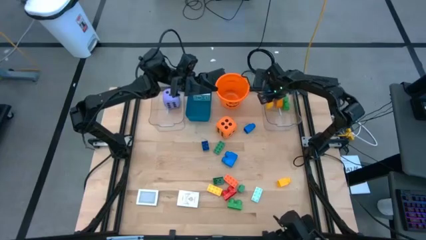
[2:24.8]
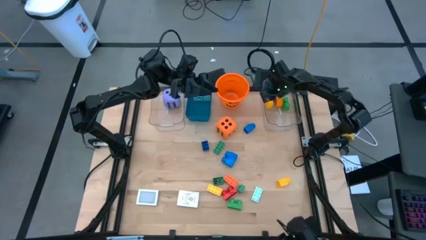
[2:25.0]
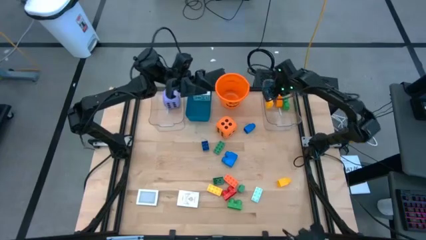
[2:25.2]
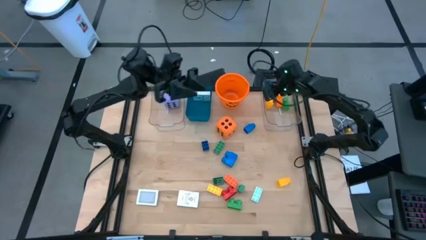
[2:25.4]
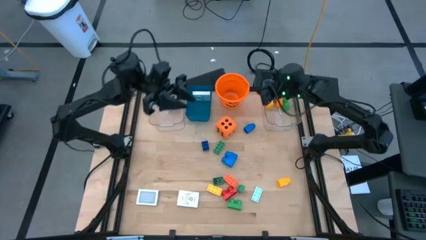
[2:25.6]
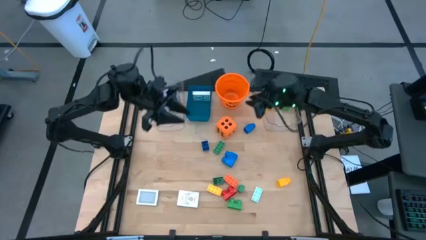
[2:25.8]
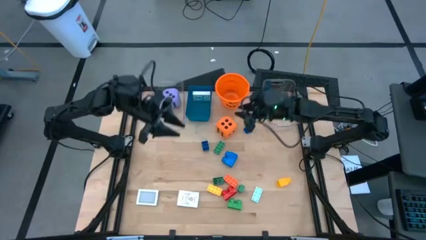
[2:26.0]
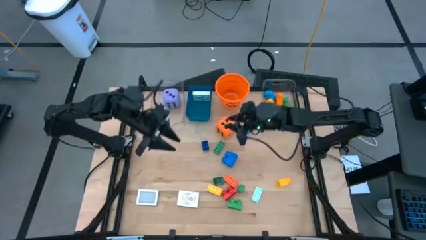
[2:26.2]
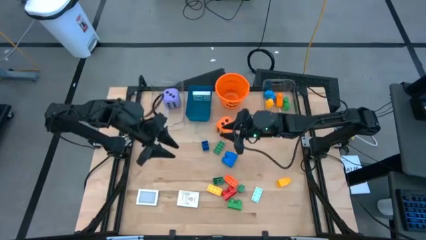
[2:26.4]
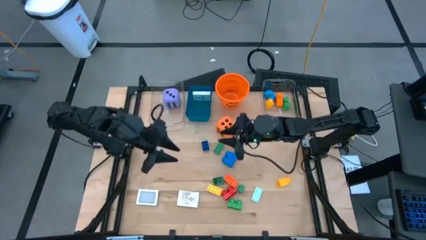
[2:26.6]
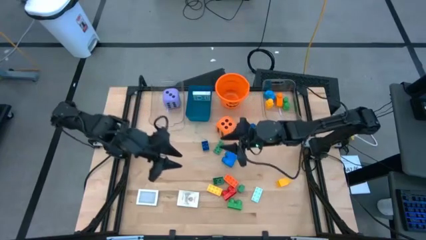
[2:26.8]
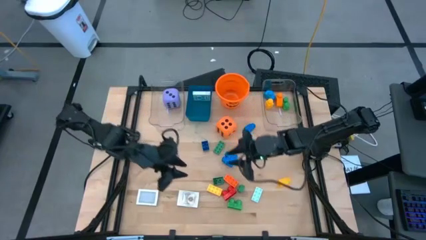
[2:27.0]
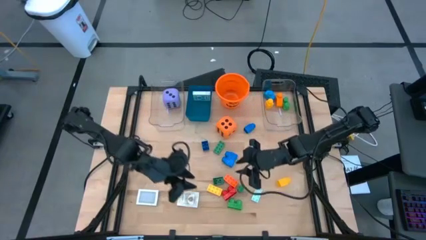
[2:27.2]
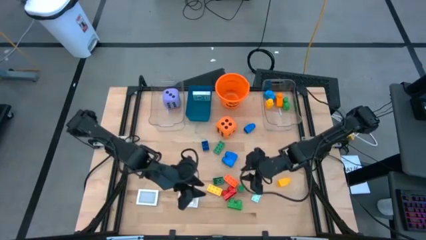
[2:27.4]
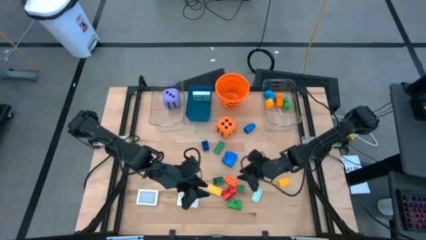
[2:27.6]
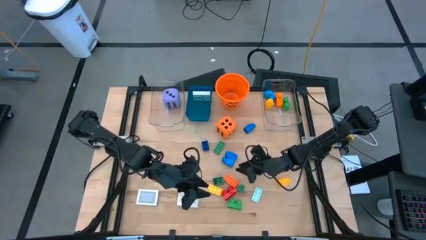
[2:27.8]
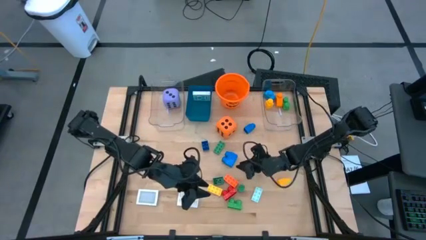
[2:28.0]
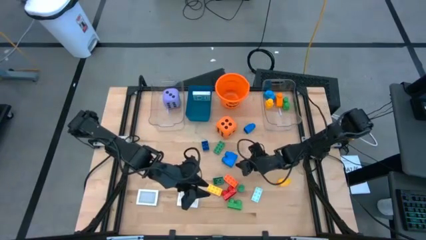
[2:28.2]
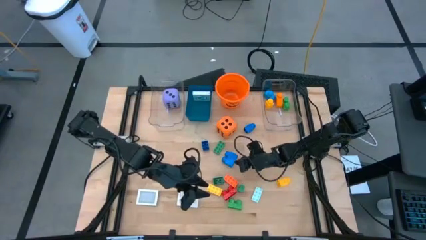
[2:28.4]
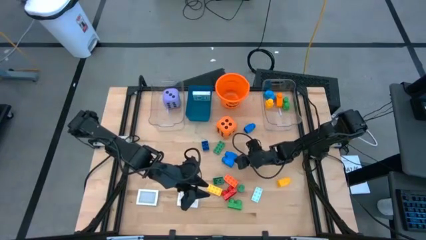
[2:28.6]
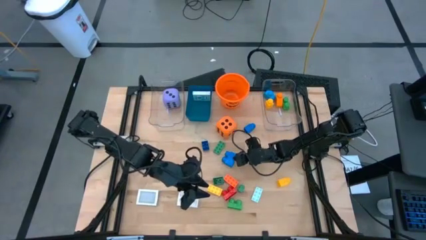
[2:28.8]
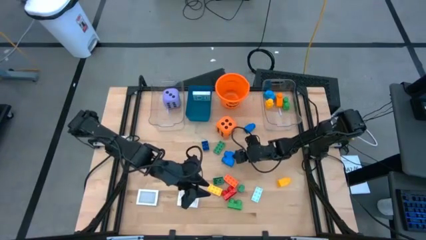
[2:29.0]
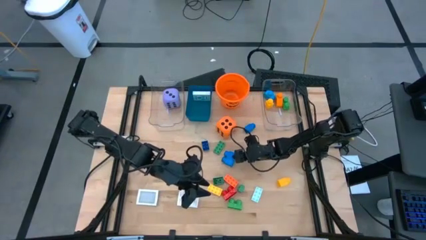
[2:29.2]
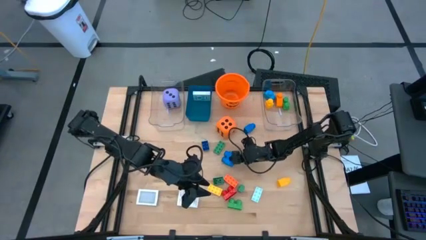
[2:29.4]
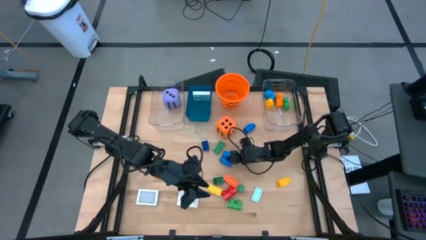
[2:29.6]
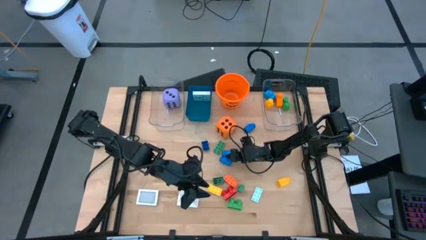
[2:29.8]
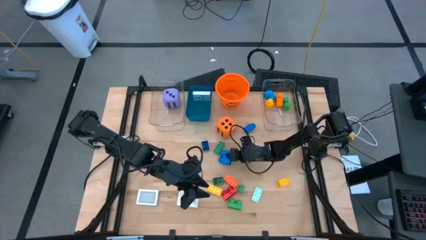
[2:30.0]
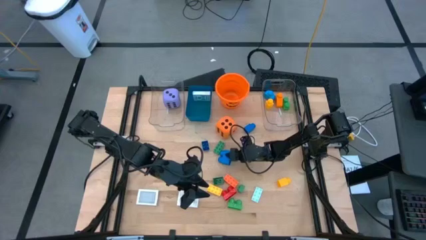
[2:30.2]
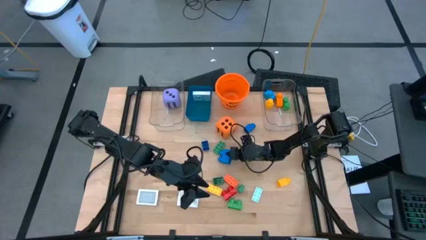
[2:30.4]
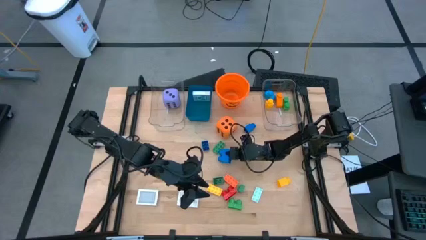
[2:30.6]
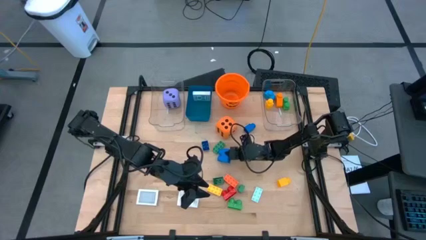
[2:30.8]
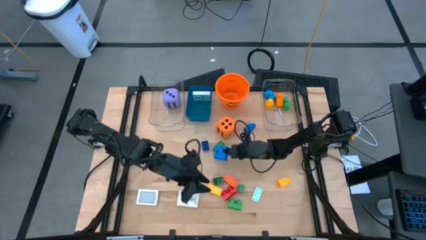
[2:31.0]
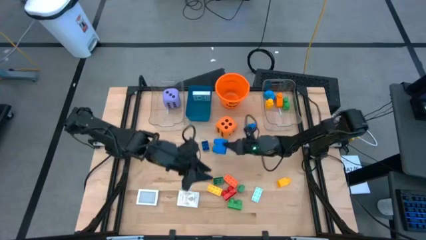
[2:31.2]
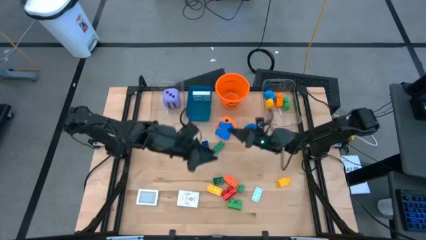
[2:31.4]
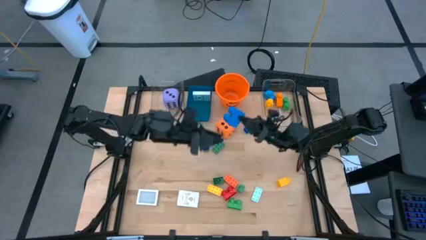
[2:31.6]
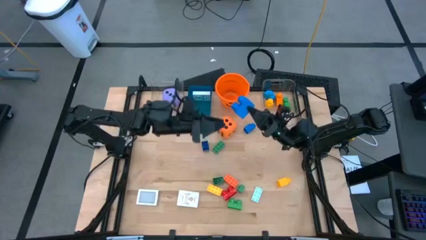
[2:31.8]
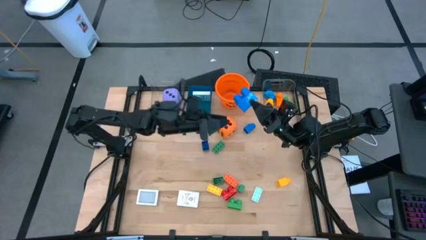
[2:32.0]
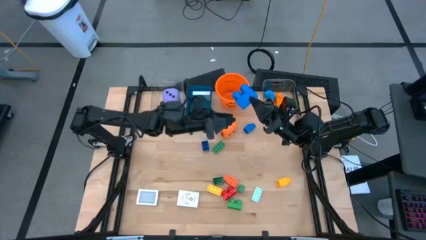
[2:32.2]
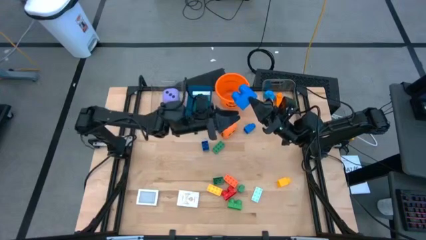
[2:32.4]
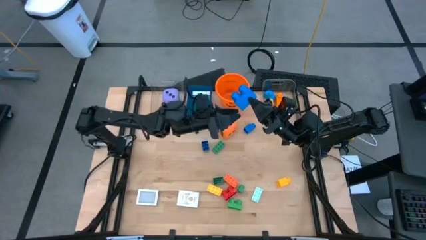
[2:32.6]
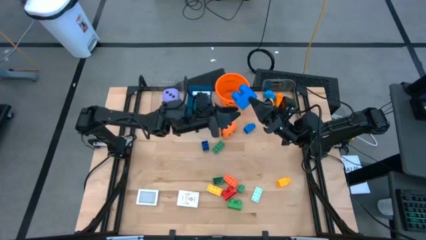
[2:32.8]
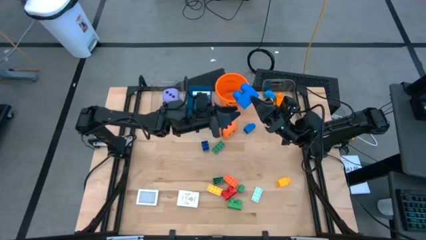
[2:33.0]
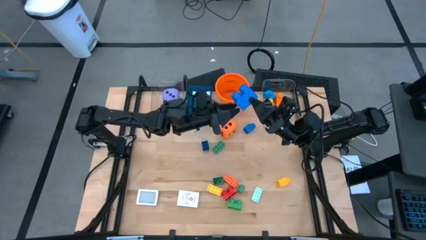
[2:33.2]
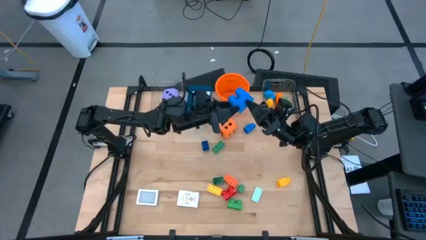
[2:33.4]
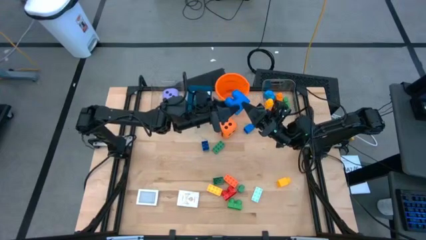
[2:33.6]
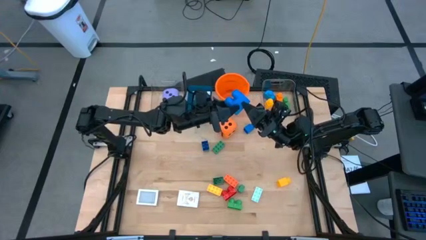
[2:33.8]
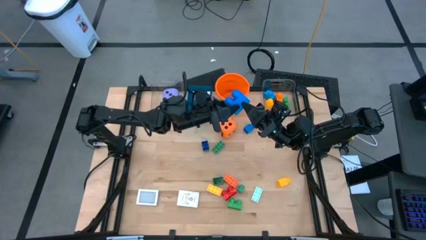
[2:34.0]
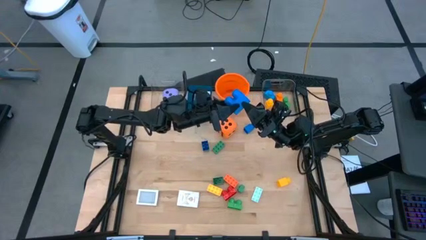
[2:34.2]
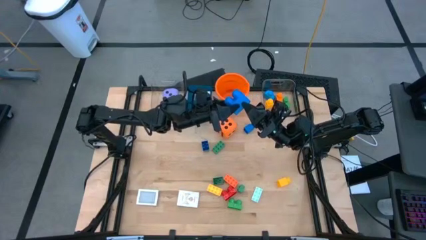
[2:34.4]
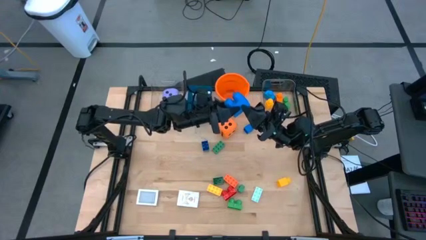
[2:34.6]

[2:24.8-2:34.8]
Task: Pick & Place Toys
Put the blue game piece into the right transparent bin

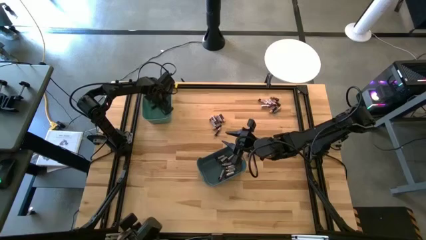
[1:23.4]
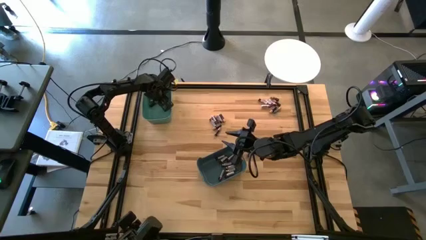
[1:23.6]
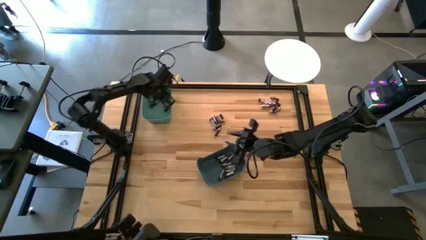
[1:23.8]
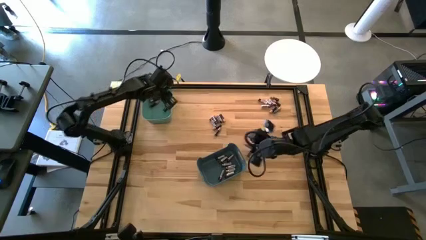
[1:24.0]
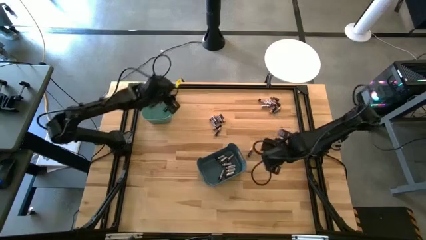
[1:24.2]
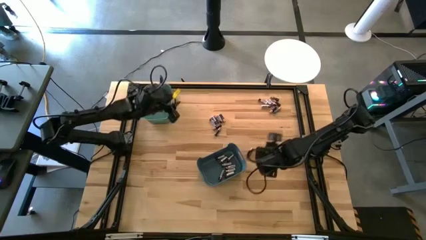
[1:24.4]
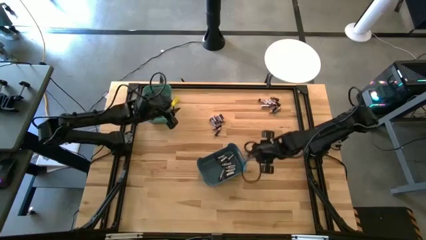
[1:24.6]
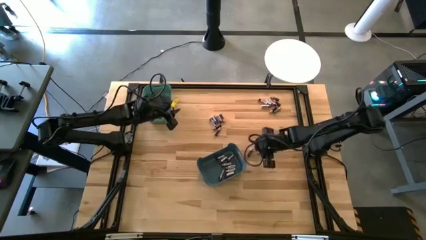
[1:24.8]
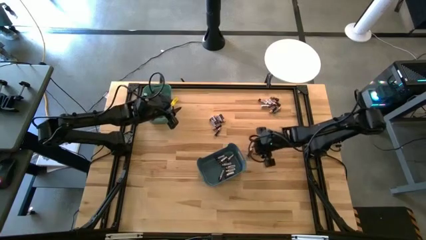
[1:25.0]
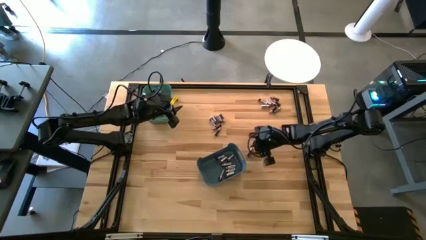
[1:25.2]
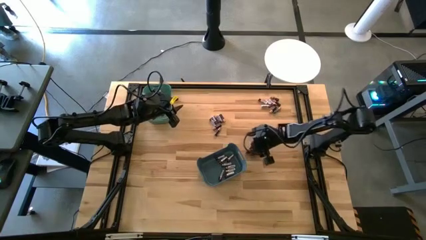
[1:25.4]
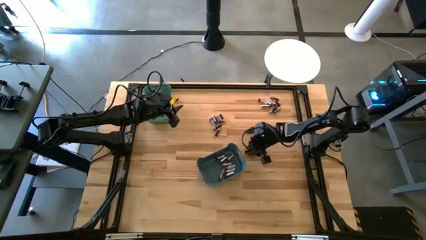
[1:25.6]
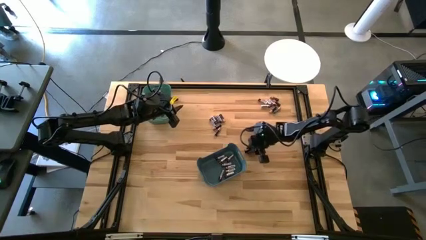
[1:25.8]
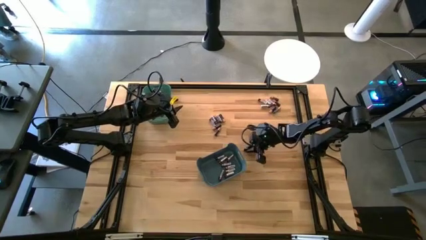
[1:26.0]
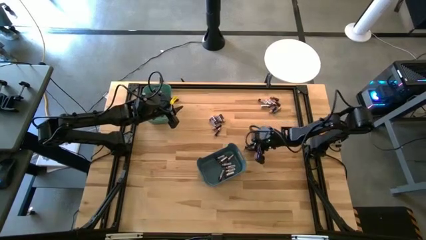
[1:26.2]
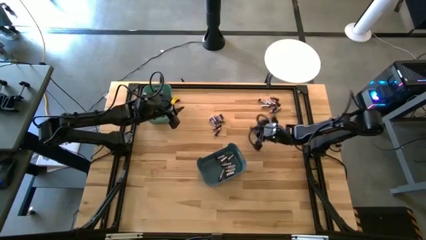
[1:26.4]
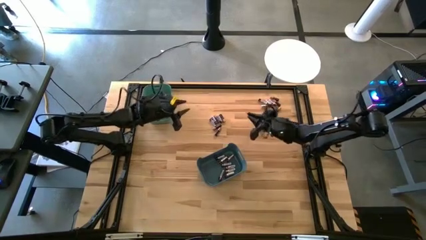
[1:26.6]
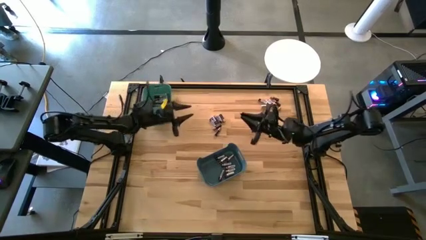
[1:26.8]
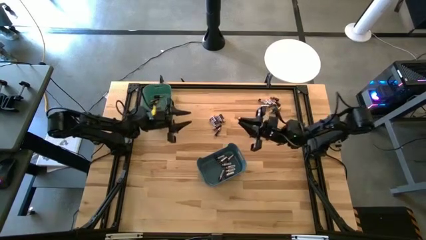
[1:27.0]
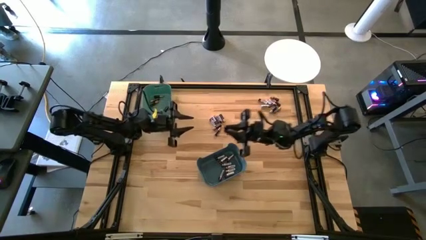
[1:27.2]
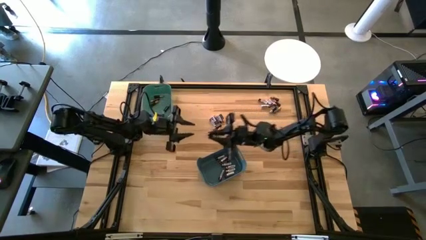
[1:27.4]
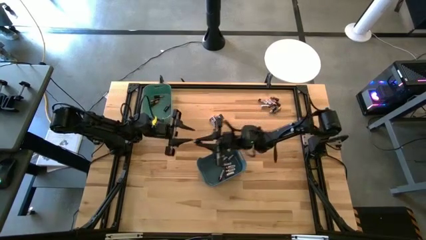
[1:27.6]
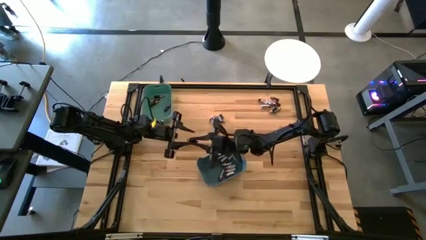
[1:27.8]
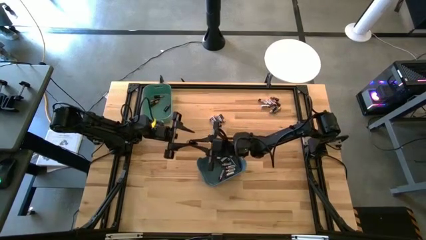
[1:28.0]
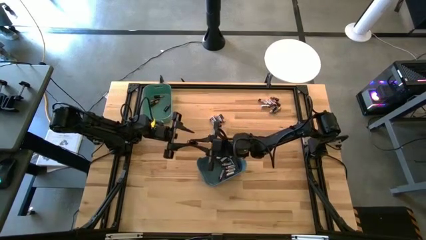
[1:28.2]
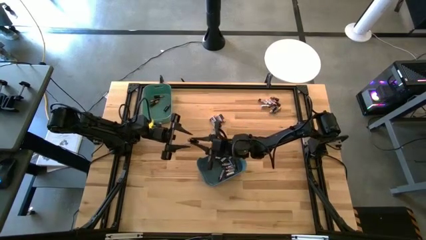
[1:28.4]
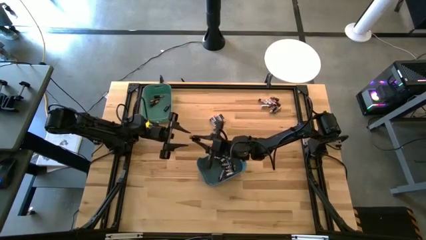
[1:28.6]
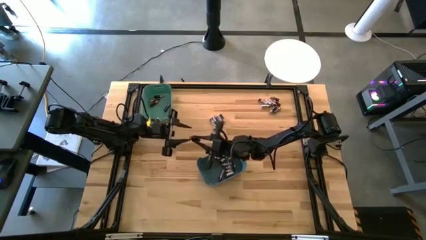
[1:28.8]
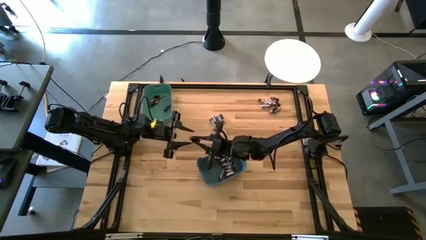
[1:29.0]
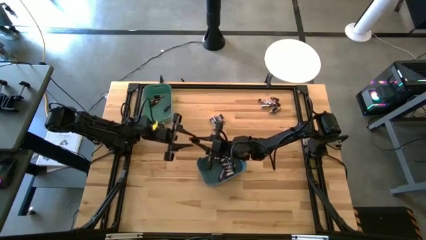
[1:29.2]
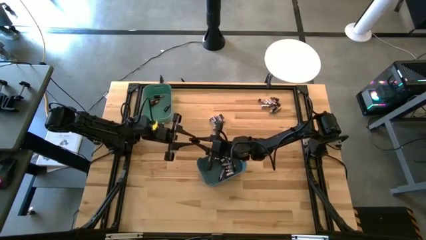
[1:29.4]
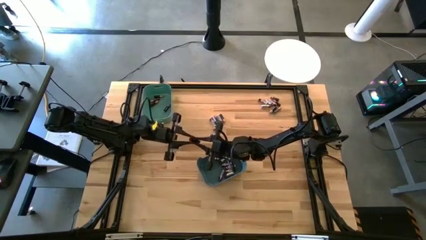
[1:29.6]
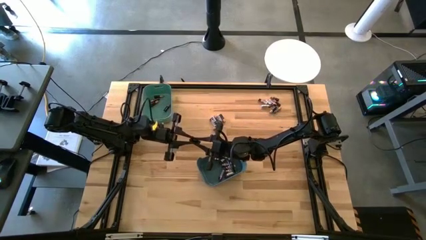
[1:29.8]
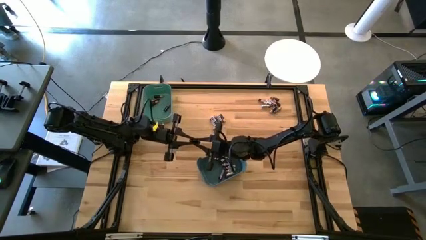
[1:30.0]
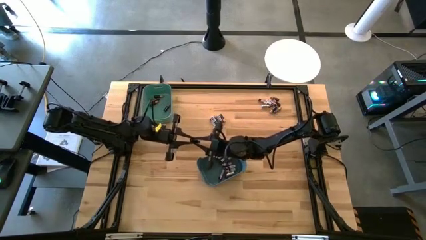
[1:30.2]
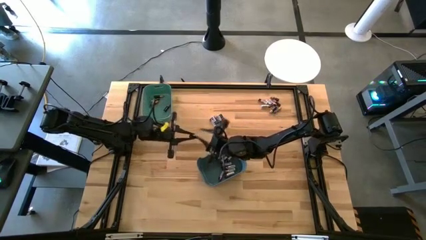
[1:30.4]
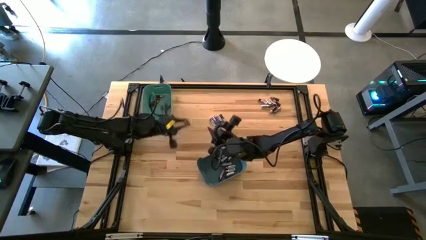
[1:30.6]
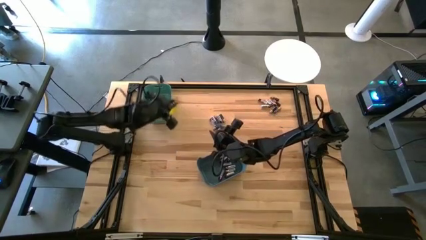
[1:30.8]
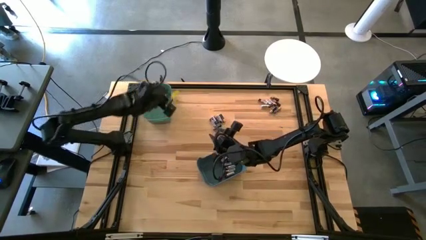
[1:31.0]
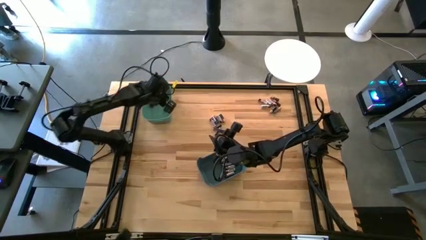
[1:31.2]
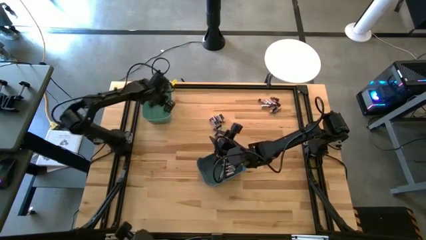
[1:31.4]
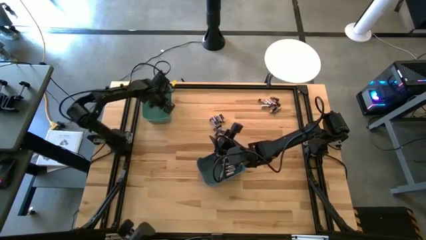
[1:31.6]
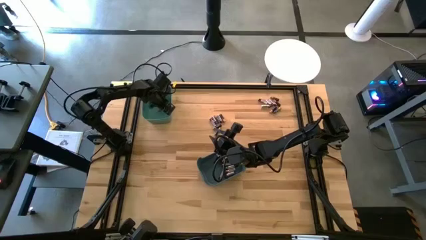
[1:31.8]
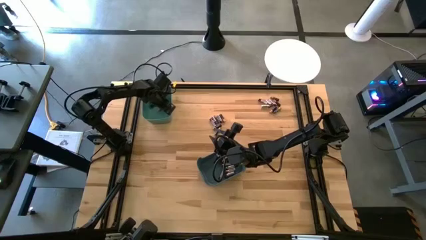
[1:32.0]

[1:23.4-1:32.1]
Task: Sort batteries
Put the black battery into the green bin
